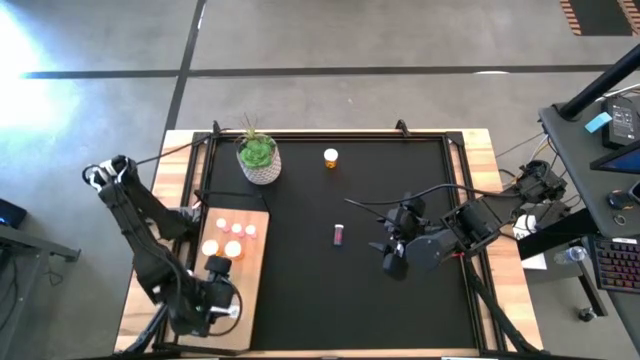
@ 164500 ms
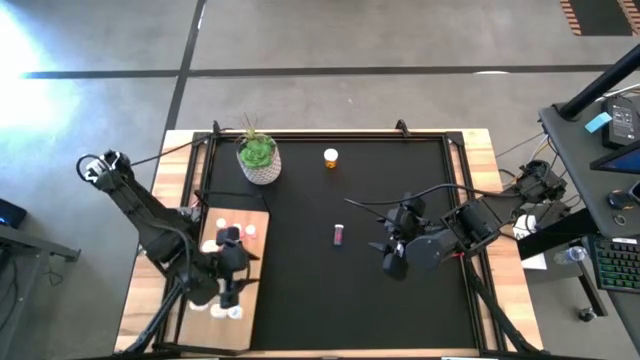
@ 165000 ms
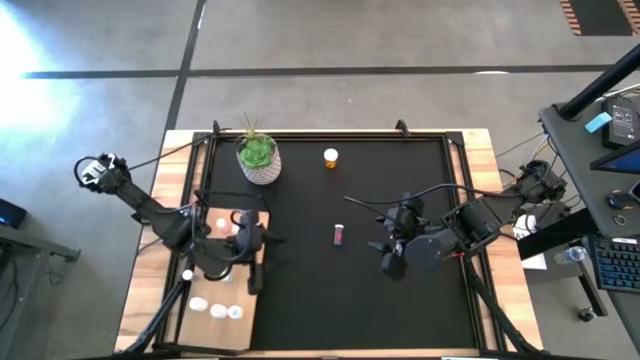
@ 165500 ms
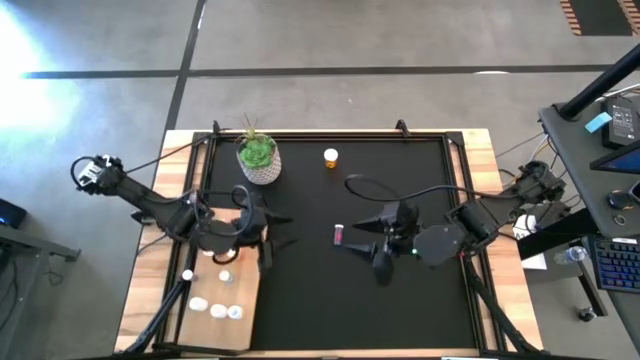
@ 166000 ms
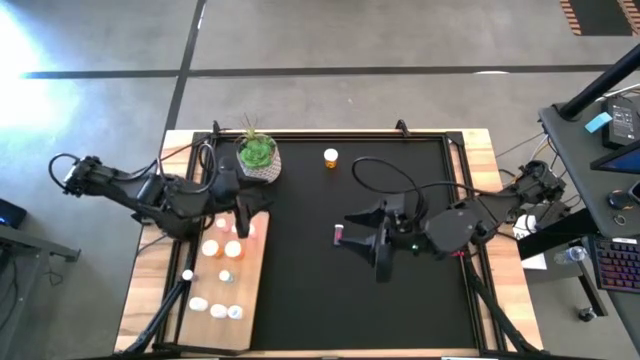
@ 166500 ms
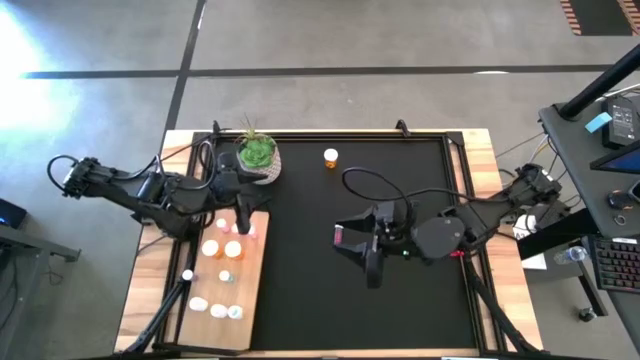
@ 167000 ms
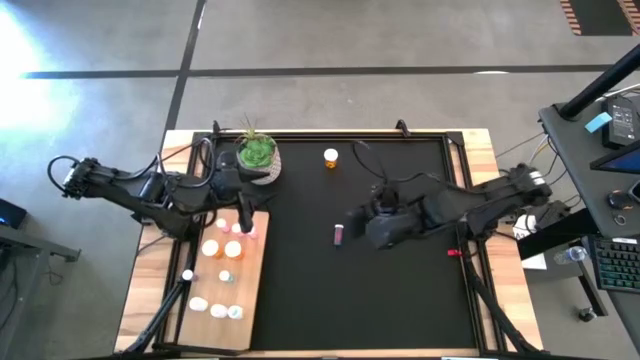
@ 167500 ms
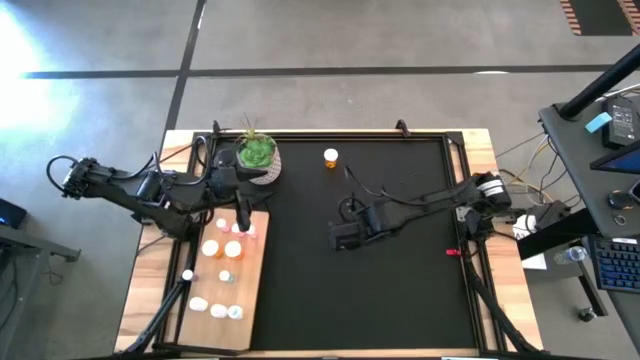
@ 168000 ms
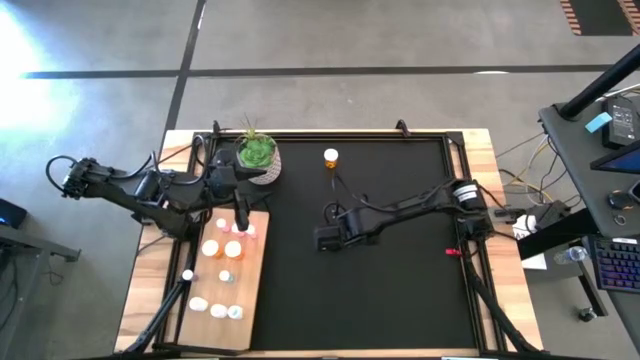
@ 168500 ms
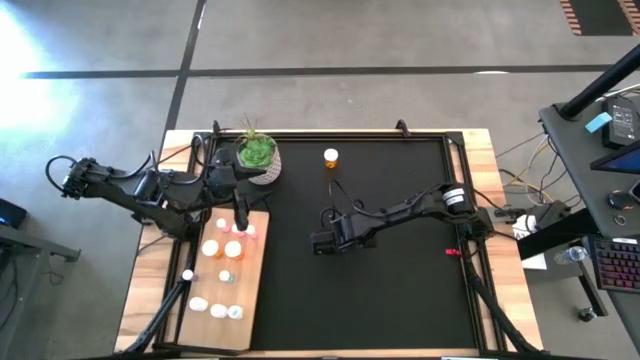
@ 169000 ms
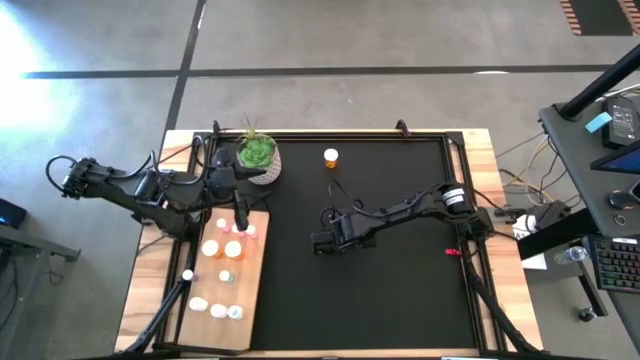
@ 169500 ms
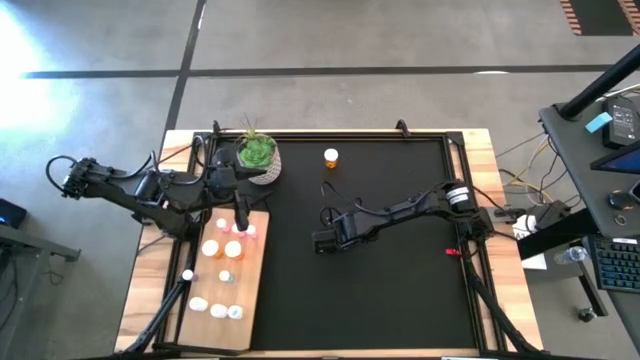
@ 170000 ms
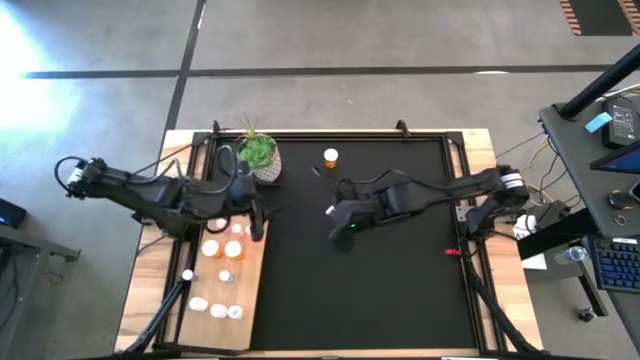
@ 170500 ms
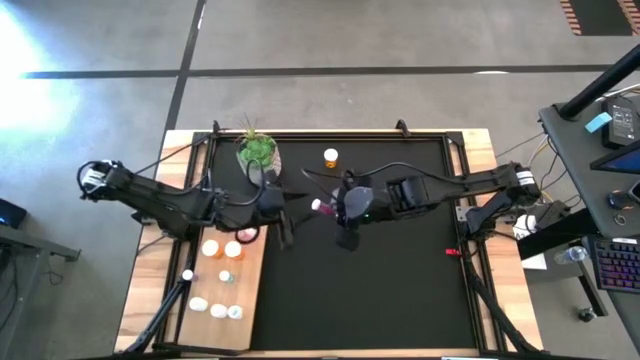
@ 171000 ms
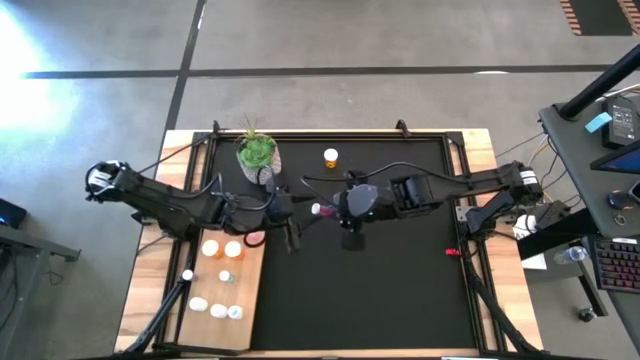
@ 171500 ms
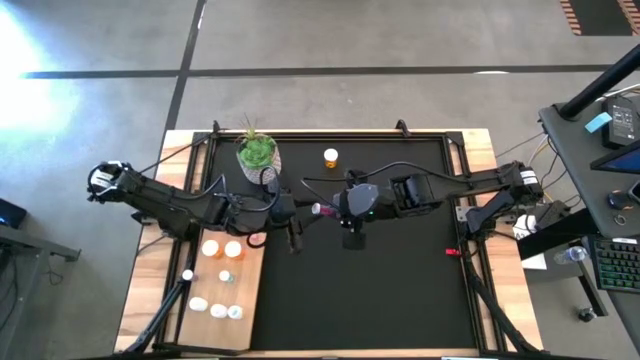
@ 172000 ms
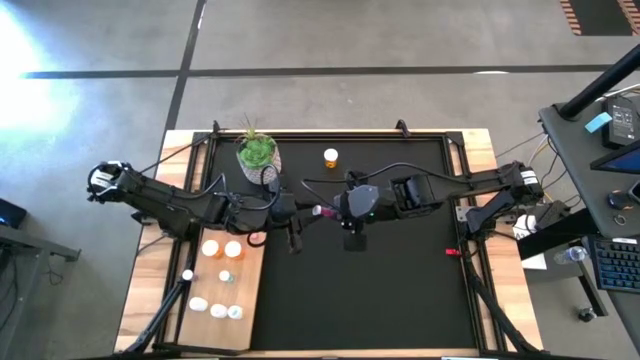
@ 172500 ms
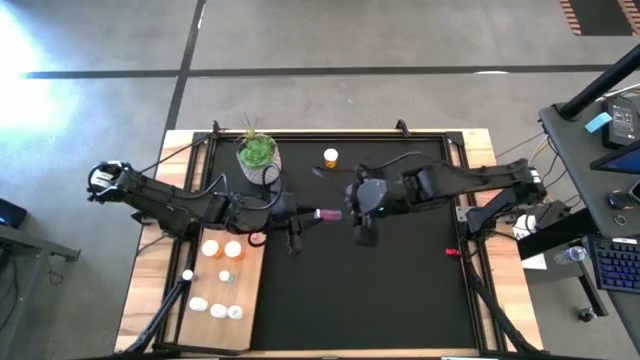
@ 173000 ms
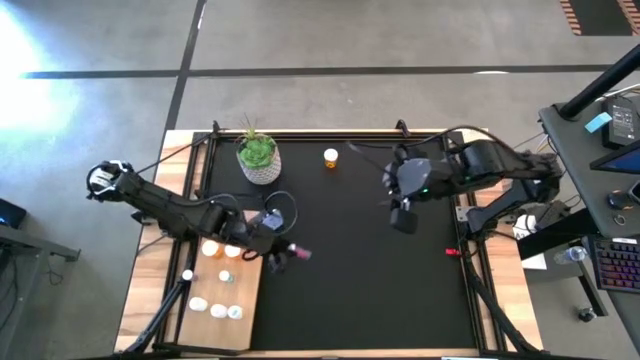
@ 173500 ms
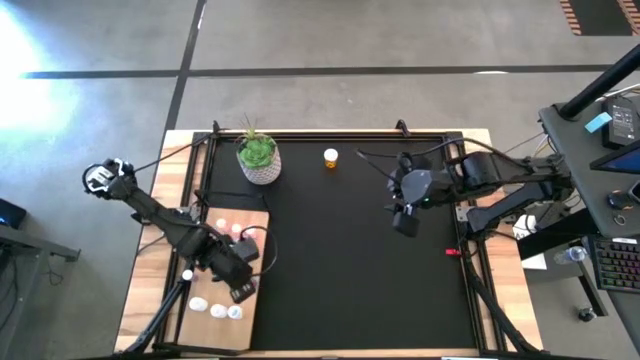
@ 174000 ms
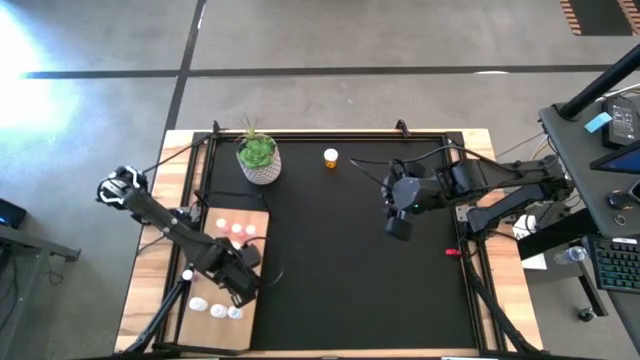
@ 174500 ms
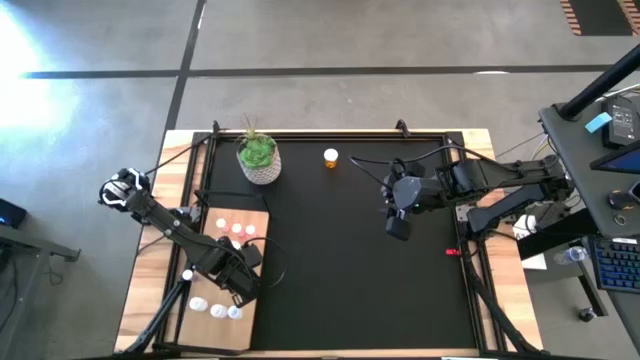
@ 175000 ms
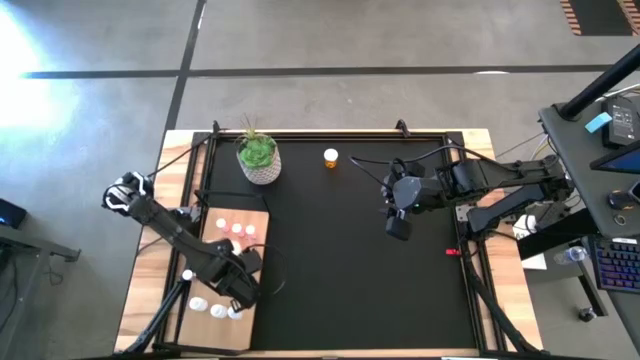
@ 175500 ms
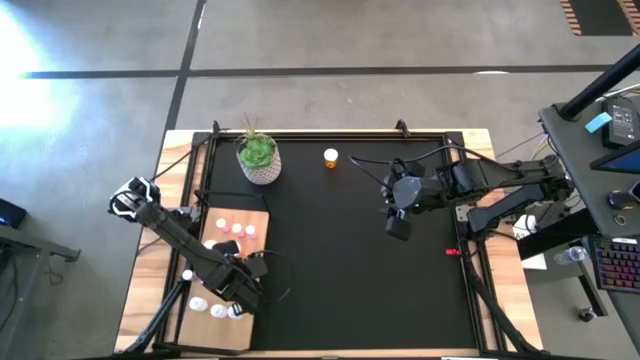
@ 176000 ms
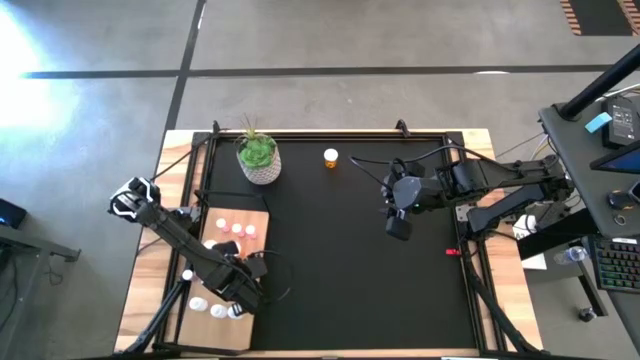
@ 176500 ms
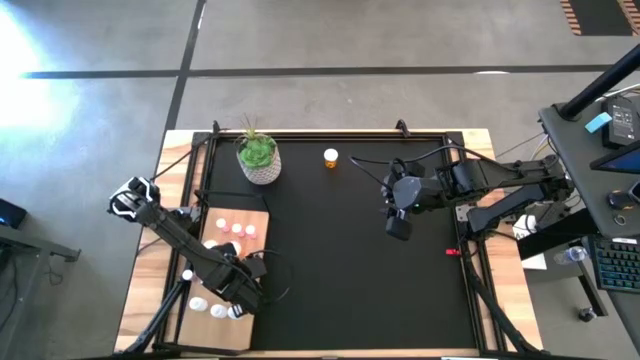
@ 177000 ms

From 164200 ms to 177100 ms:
Task: Pick and place medicine bottles onto shelf by color
Put the blue pill bottle on the shelf aligned with the other blue pill bottles

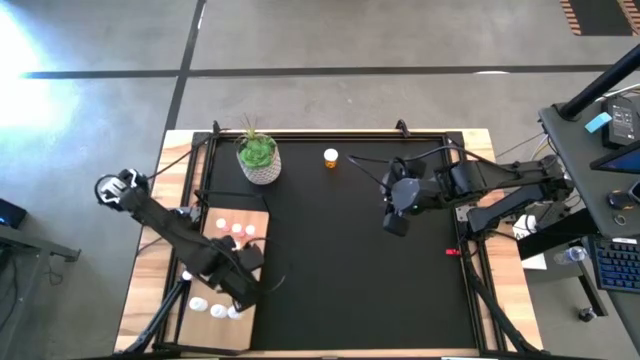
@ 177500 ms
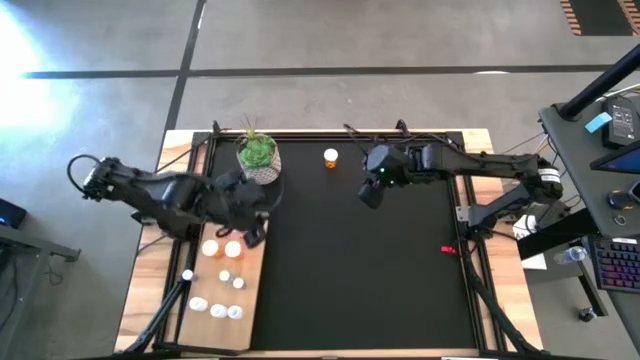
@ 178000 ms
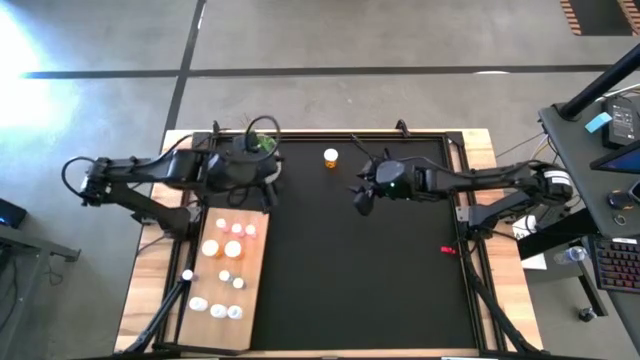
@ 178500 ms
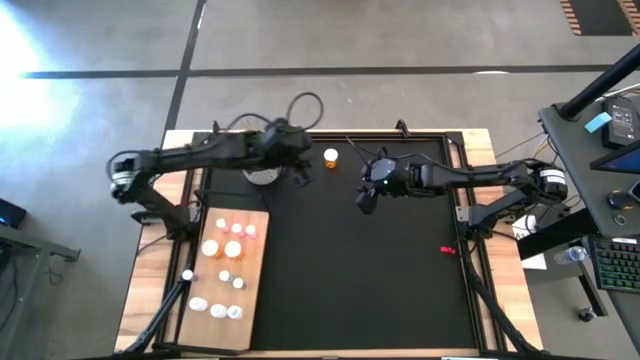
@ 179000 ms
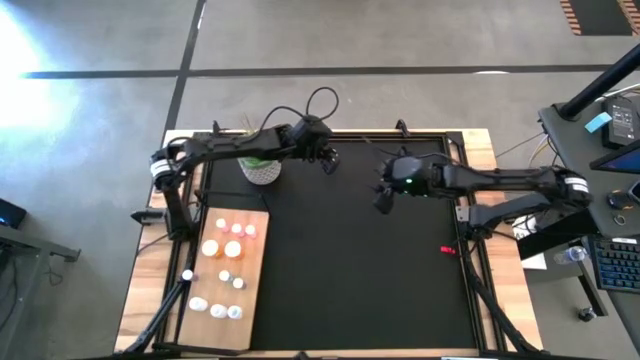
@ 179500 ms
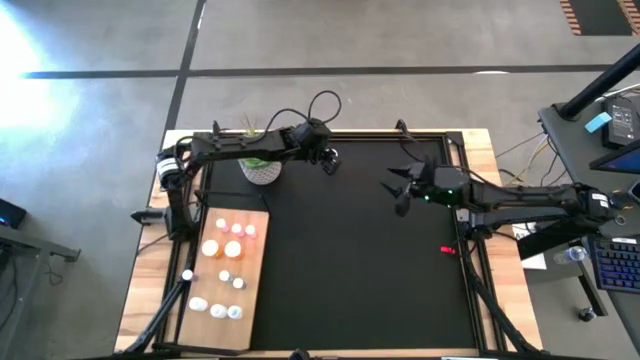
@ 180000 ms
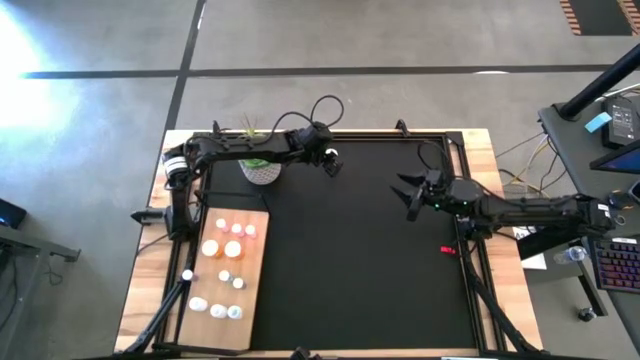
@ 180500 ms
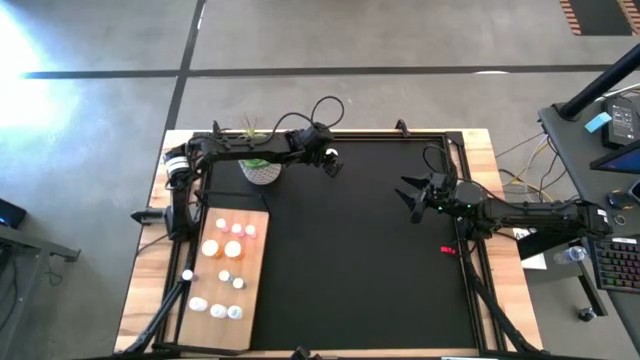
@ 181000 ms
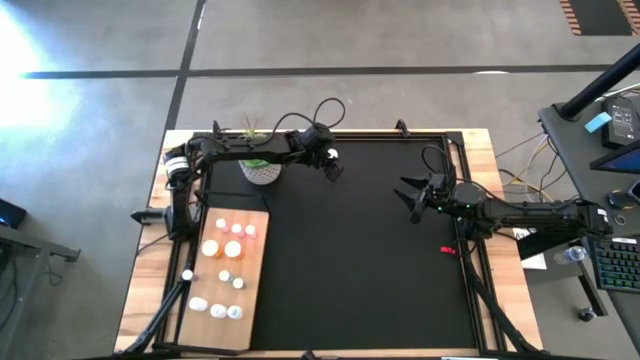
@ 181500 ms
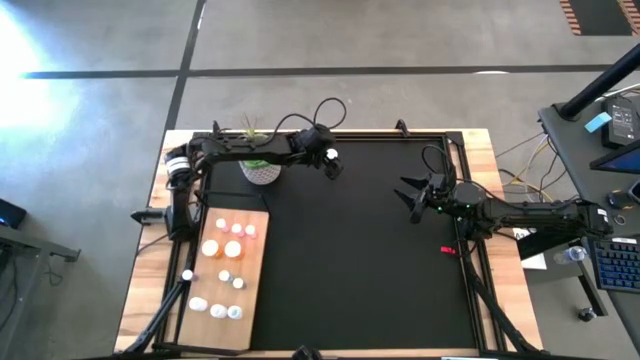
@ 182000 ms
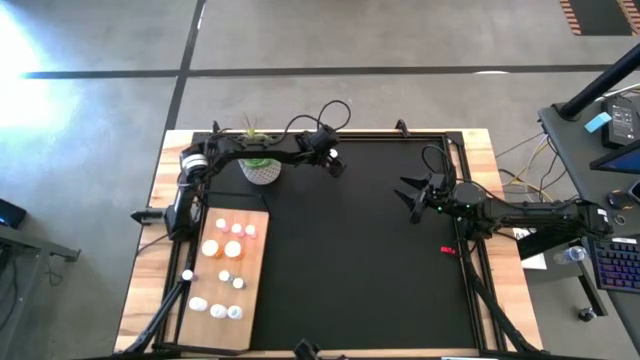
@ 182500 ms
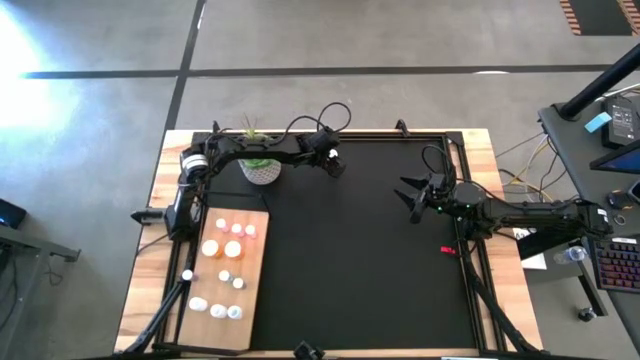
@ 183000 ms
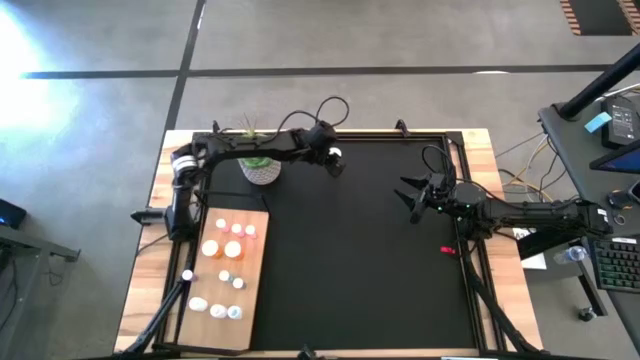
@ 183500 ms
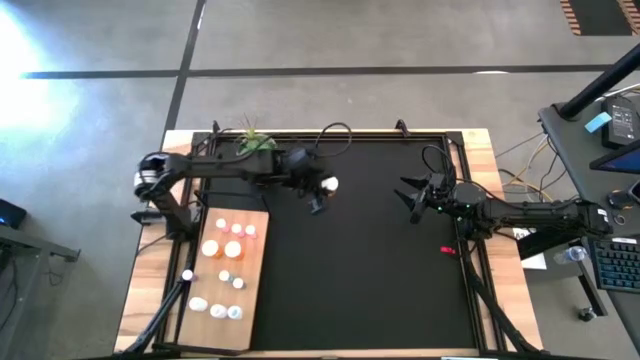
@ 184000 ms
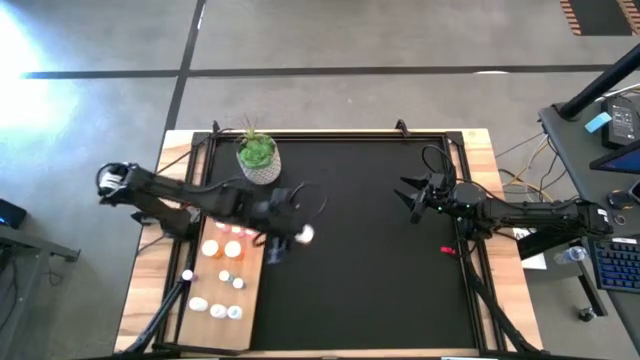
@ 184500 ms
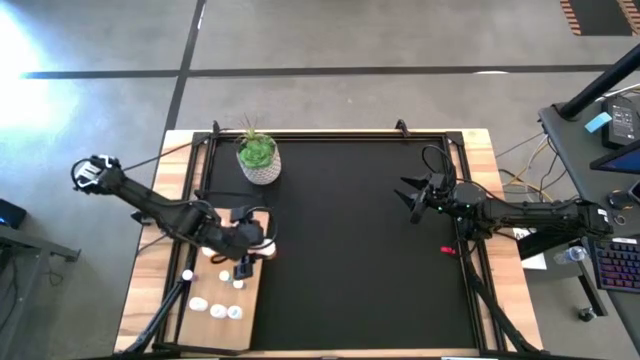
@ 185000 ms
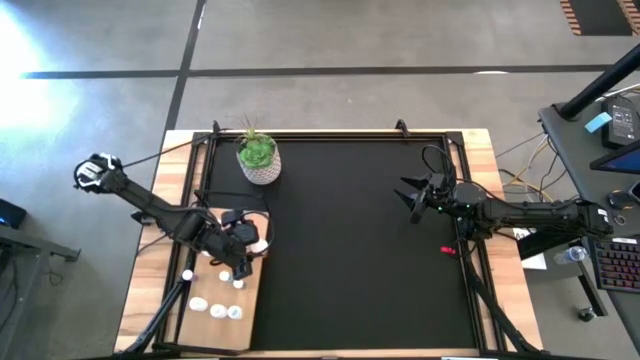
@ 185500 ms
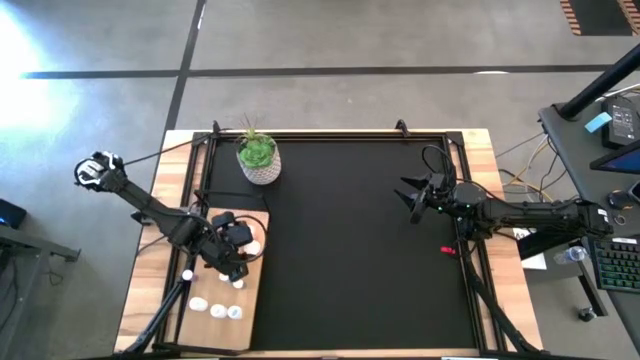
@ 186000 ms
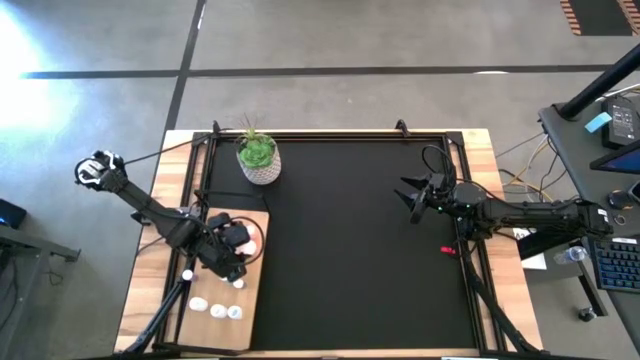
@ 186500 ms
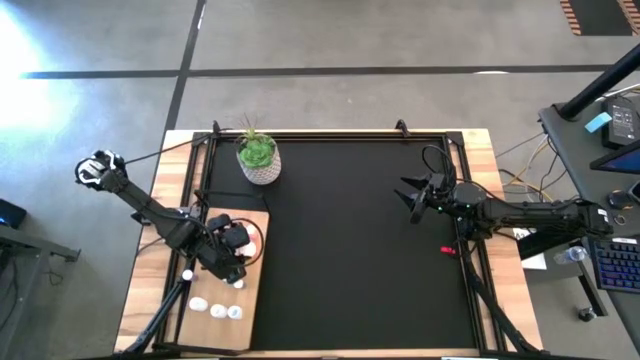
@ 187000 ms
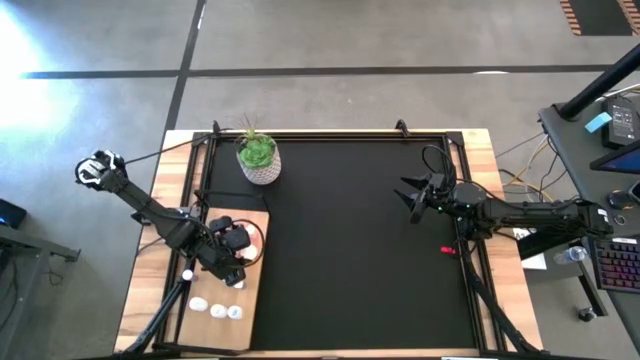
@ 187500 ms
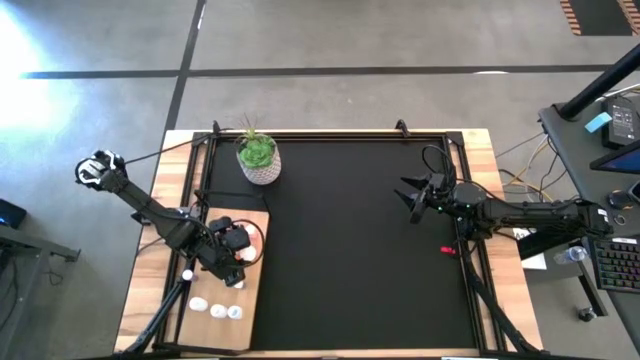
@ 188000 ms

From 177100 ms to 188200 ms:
Put the orange pill bottle on the shelf aligned with the other orange pill bottles
